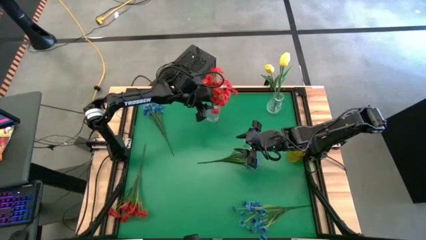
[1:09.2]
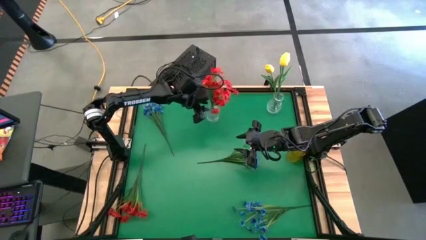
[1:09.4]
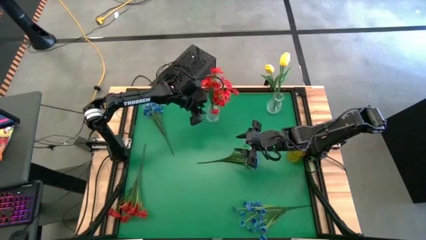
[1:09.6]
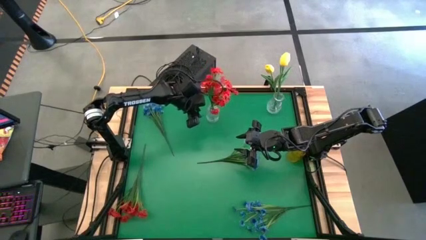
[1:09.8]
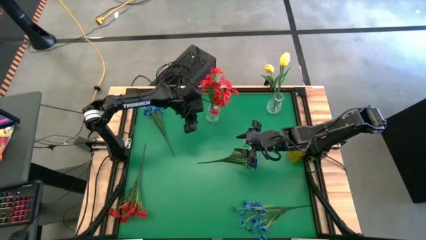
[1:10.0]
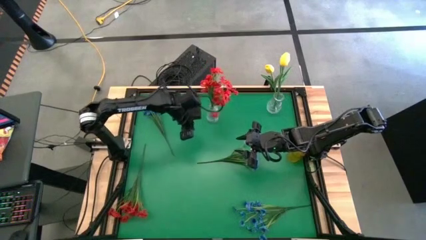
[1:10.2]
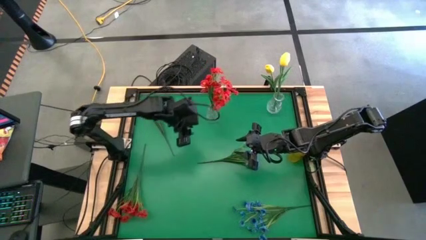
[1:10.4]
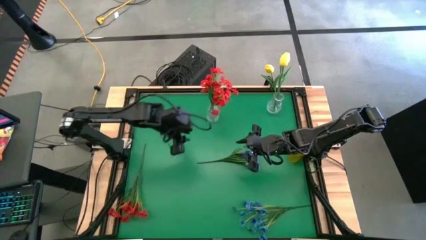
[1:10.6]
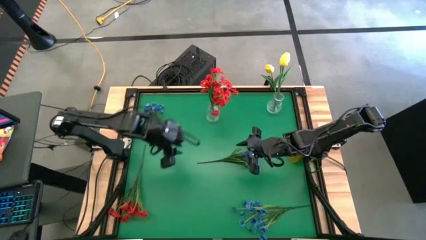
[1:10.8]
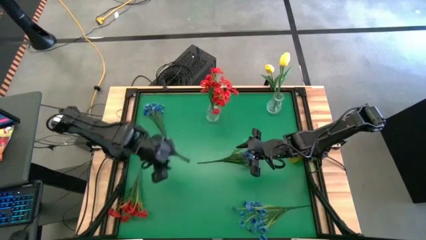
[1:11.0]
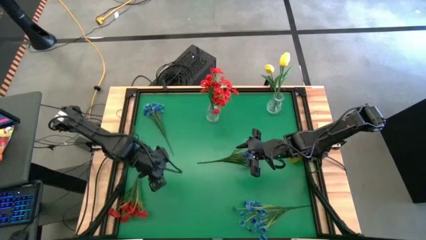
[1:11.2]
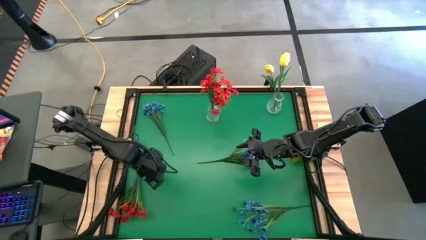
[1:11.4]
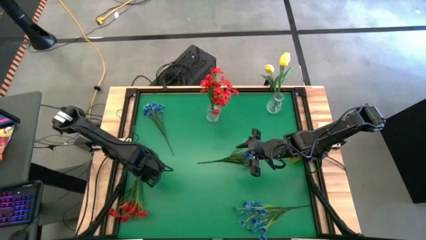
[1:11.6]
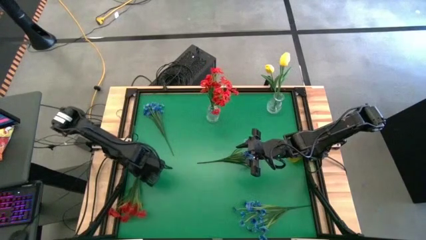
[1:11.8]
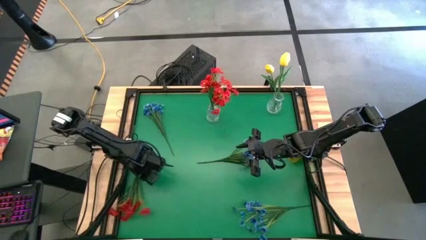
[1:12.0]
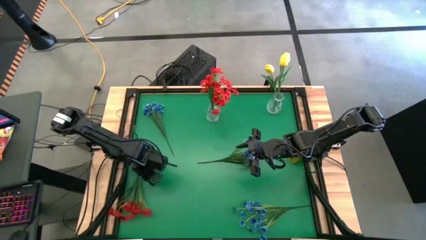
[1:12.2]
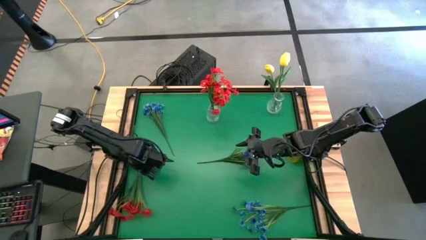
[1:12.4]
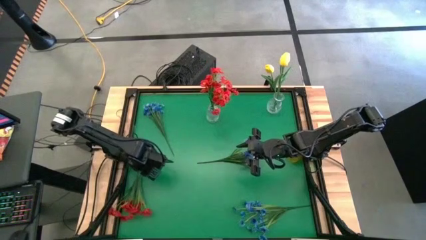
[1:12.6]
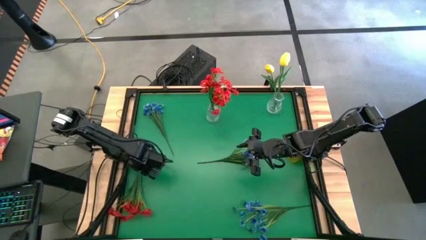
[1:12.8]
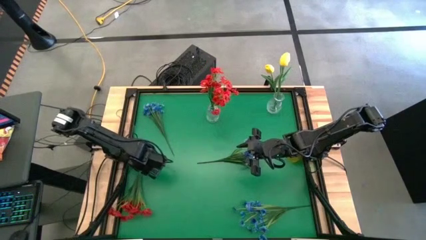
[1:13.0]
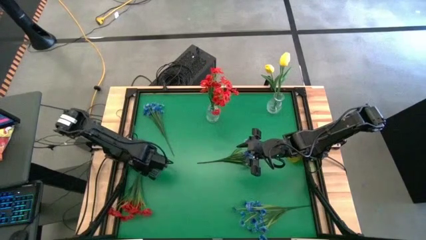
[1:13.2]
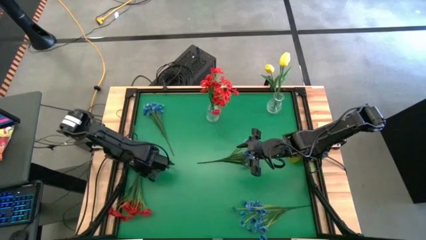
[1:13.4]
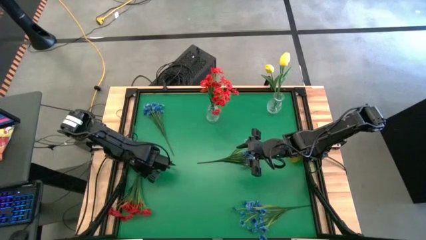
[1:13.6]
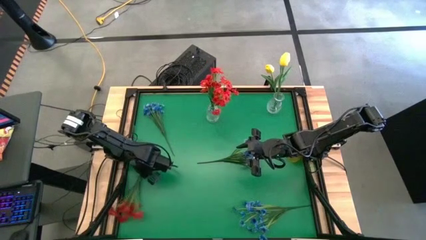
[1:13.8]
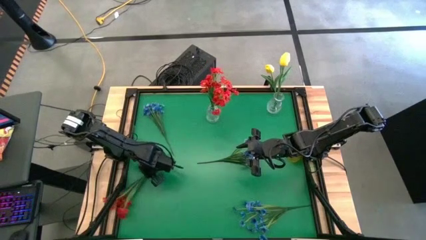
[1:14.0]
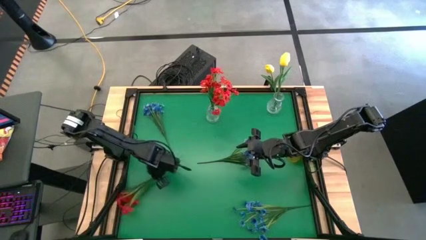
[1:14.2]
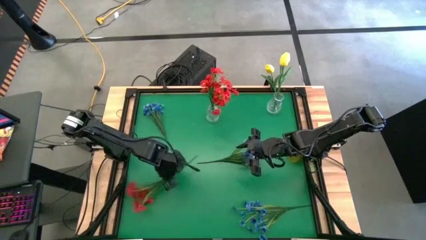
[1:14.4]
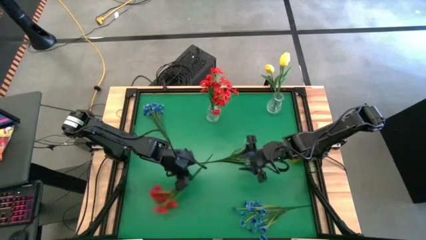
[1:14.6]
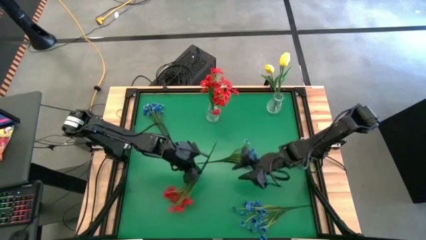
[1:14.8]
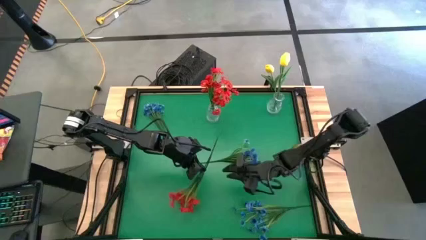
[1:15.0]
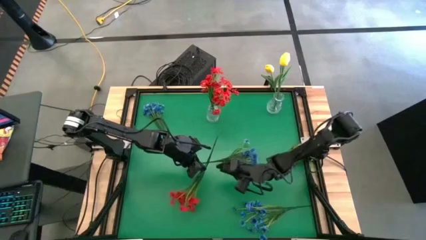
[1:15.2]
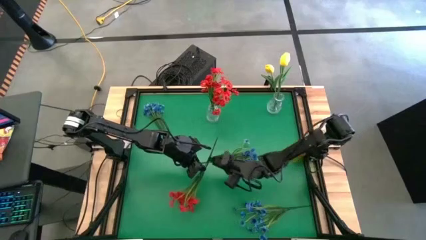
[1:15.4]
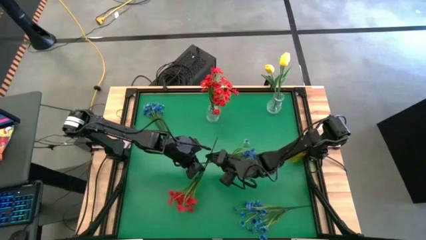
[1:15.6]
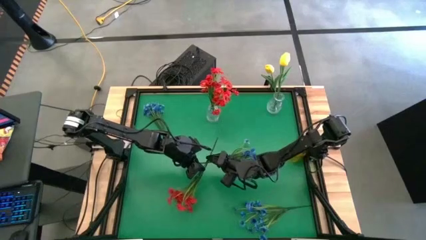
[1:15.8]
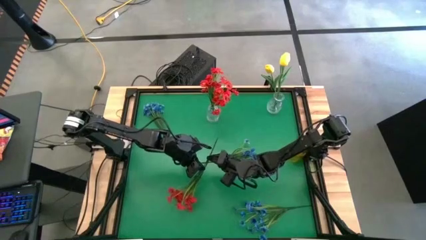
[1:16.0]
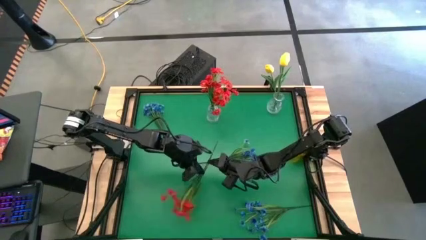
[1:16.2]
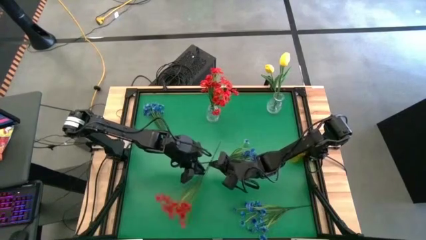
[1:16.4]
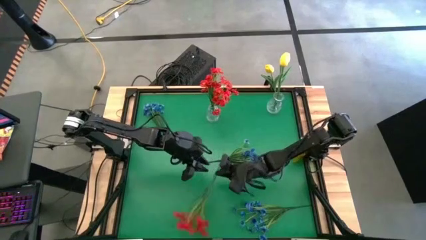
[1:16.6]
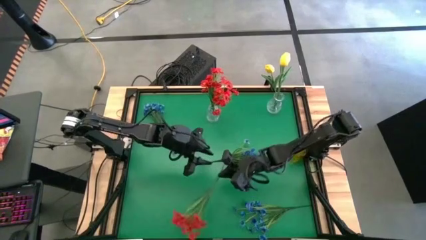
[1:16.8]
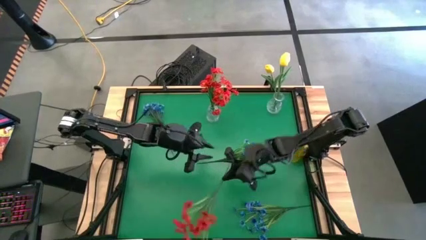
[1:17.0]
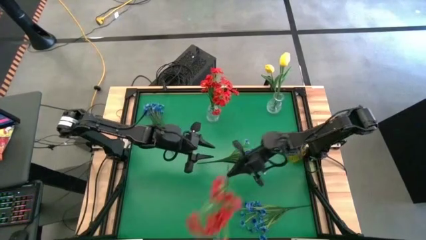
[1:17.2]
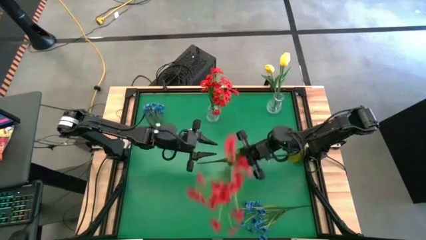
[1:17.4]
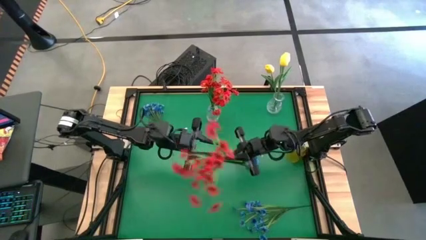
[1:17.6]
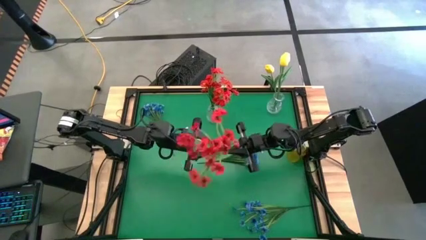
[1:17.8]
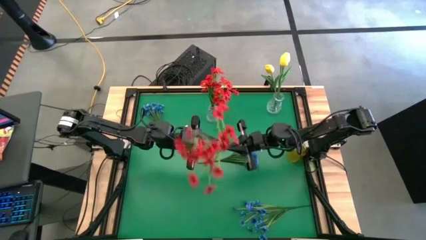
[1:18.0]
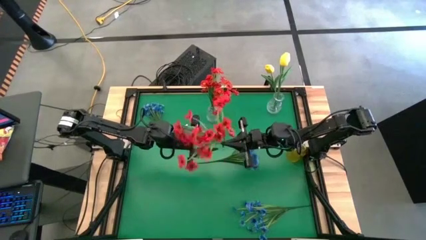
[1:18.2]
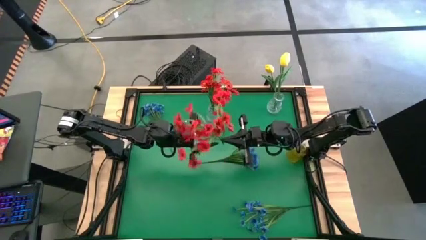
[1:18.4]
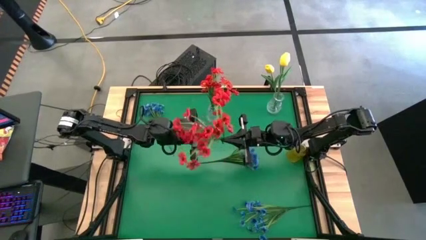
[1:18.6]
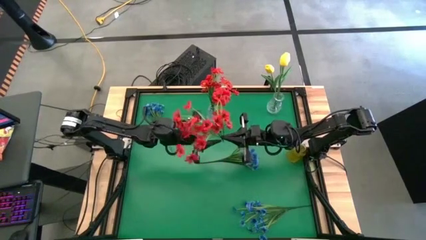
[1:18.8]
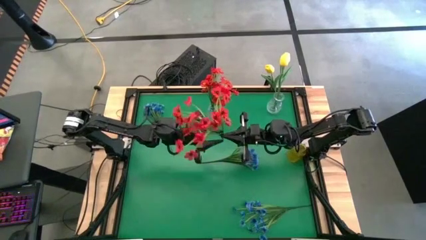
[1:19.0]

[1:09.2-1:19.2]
Task: Sort flowers into vase by color
Put the red flowers into the left white transparent vase
